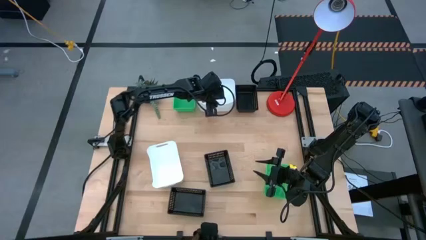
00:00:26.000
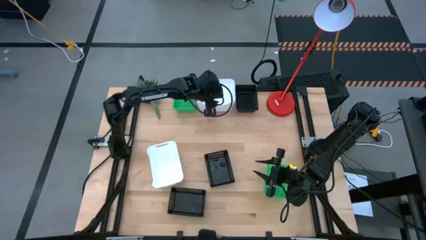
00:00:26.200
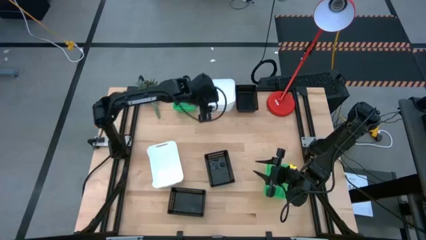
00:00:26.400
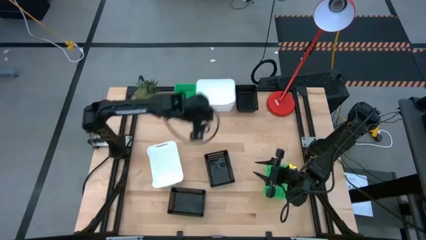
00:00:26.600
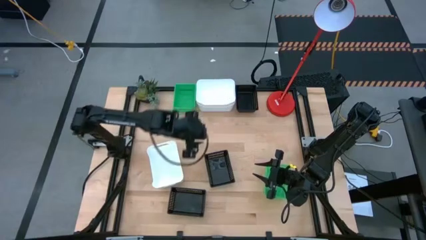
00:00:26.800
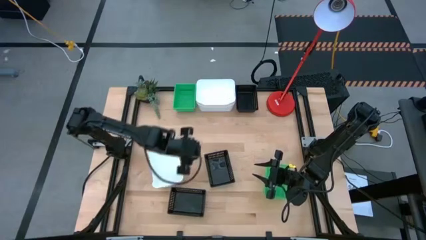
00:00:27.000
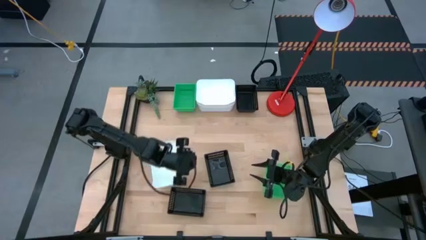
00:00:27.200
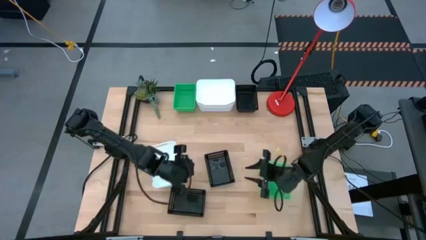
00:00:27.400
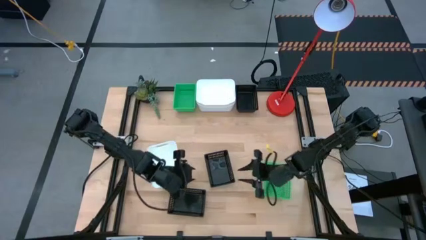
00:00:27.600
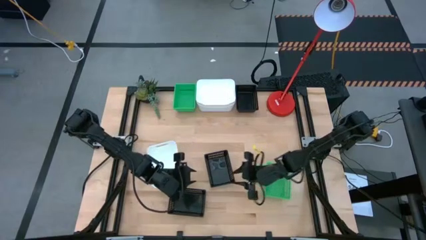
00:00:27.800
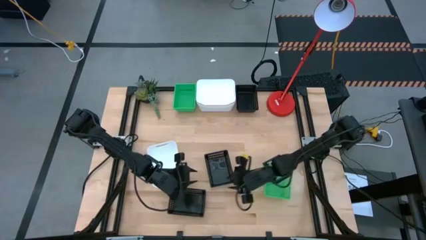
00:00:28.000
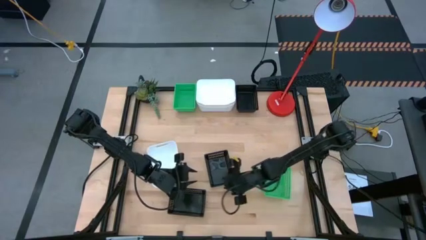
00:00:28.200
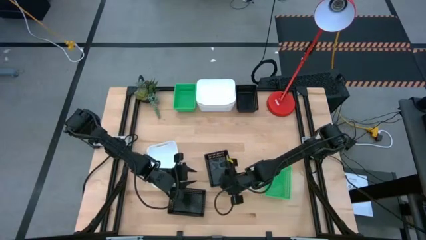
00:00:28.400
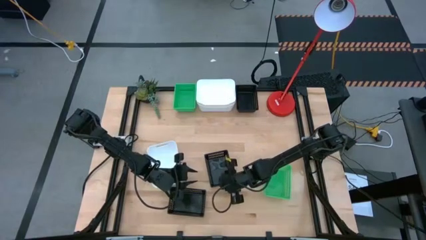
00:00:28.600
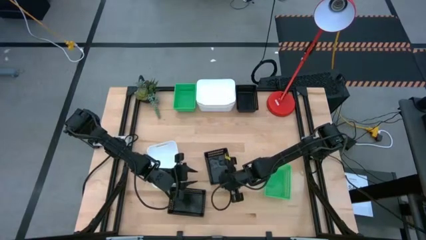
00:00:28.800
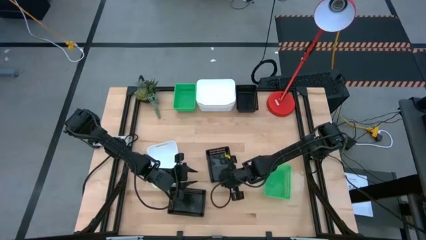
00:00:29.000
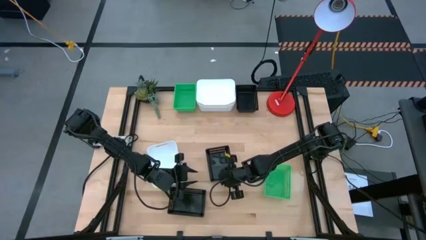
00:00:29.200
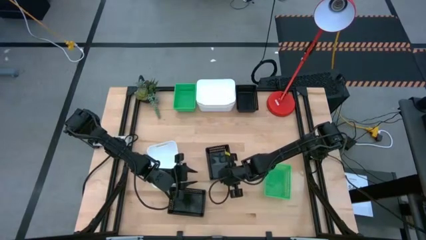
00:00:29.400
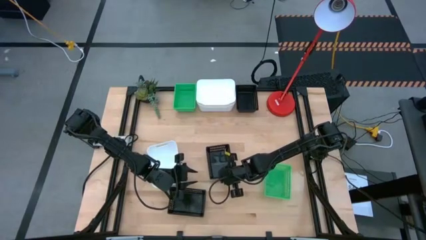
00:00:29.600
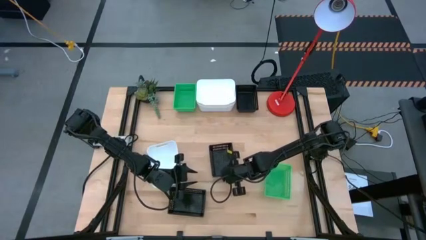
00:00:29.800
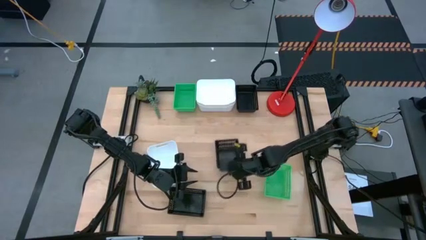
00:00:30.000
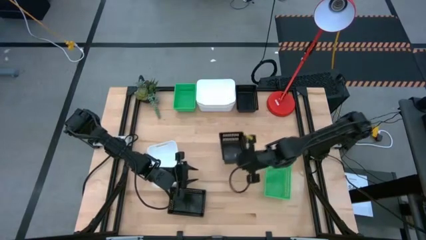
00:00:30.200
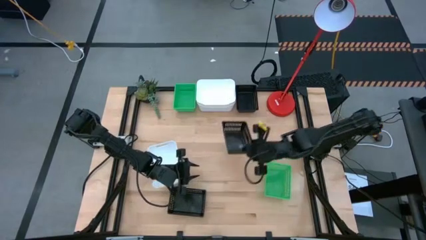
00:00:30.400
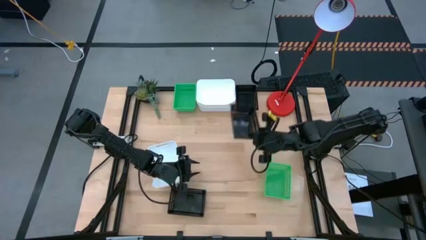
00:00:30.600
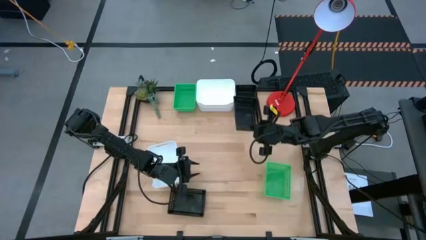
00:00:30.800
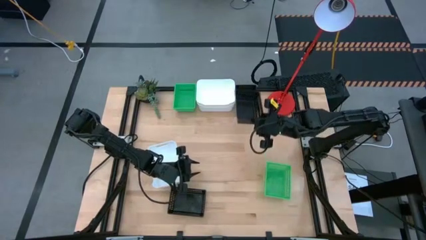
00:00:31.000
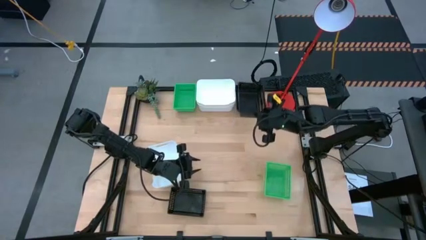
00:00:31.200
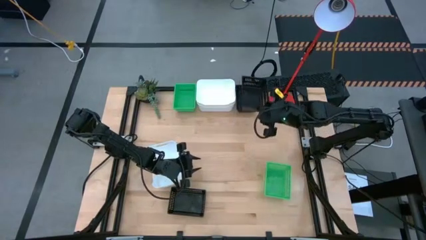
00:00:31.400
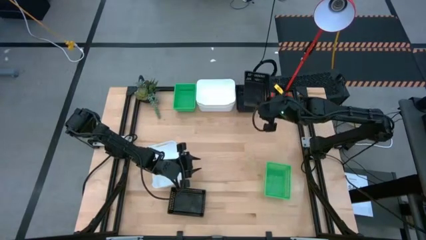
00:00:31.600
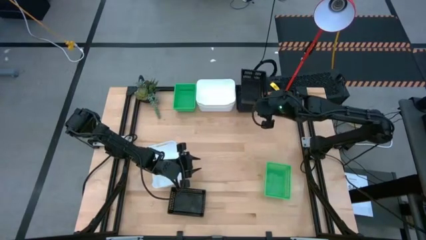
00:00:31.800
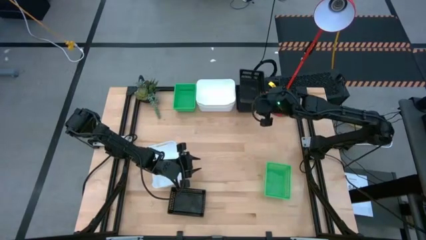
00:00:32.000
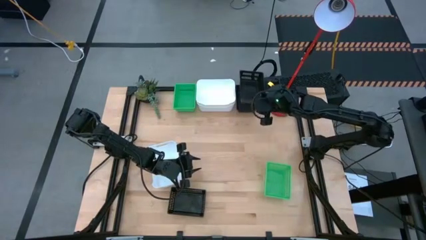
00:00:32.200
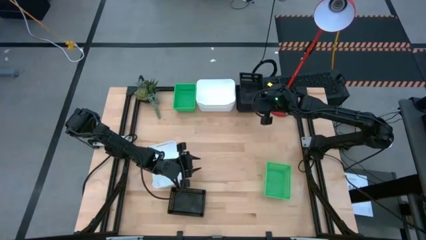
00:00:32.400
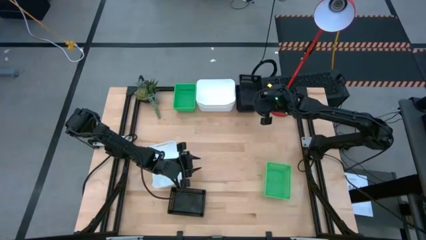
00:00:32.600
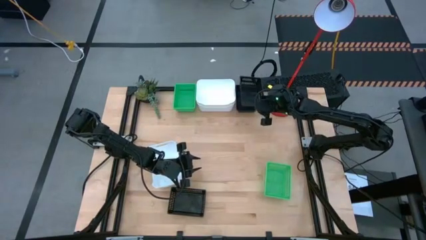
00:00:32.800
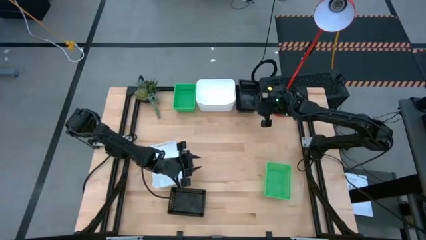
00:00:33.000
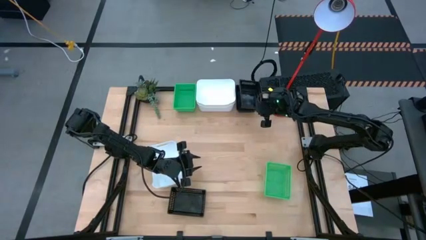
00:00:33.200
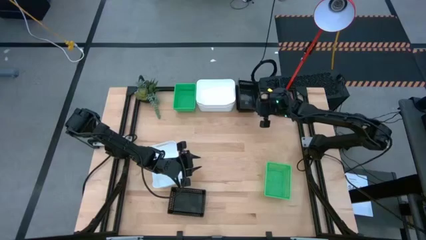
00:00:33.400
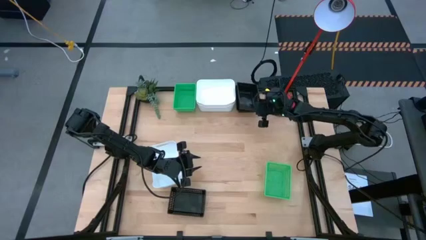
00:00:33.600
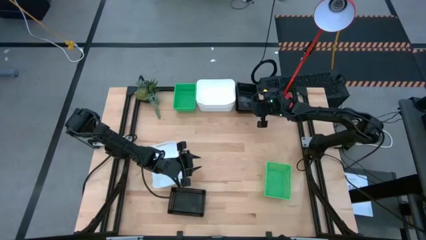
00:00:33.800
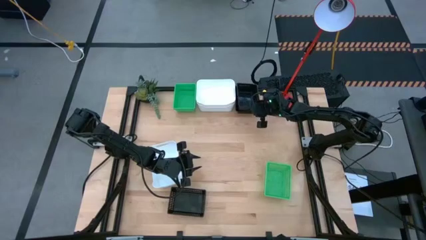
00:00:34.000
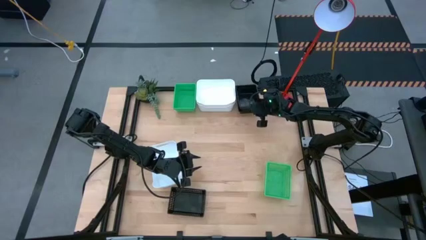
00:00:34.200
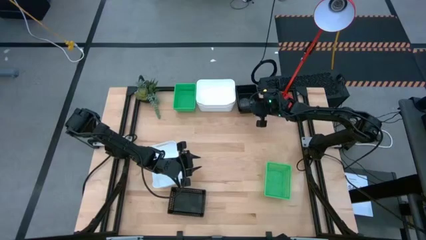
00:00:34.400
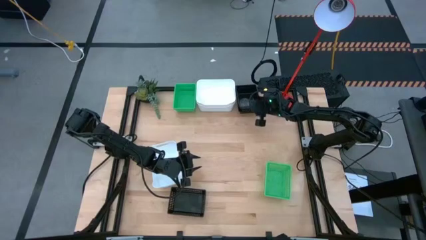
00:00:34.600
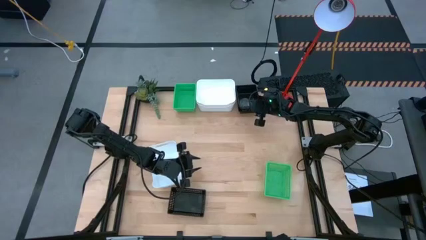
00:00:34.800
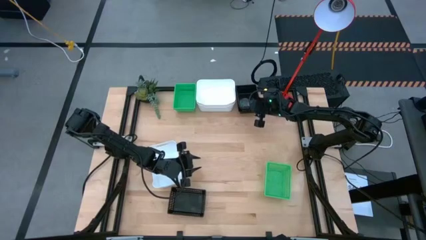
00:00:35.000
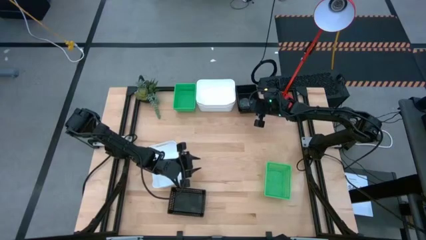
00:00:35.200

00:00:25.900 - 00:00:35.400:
Stack the middle black bin on the top black bin
